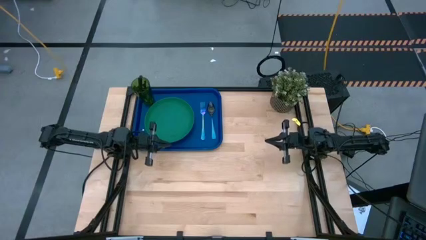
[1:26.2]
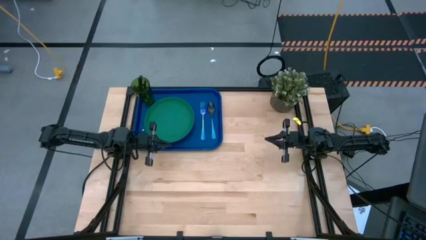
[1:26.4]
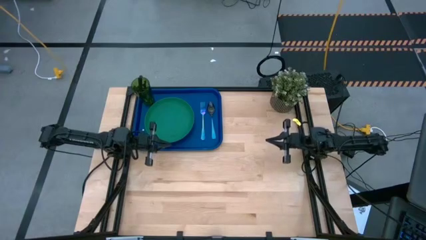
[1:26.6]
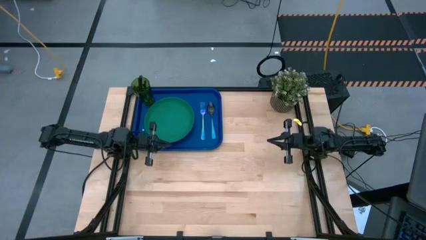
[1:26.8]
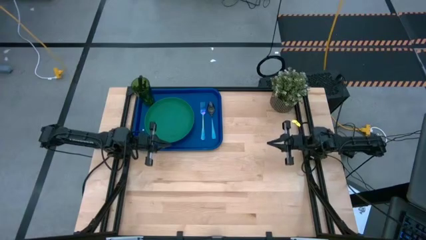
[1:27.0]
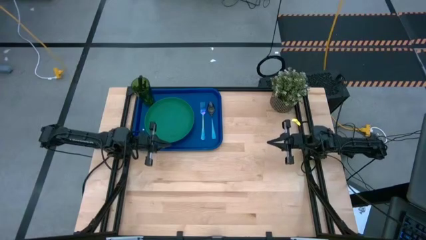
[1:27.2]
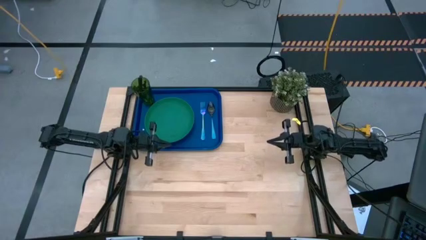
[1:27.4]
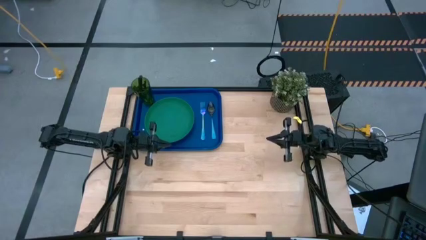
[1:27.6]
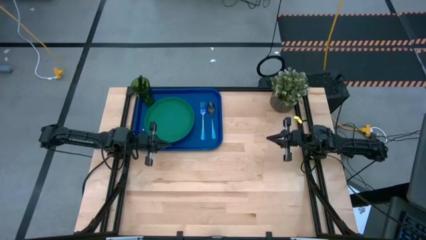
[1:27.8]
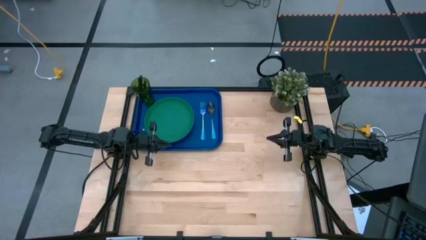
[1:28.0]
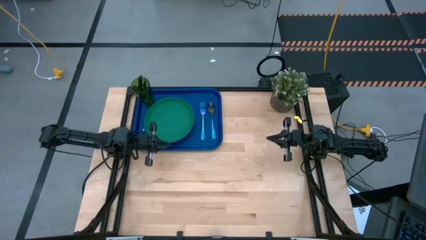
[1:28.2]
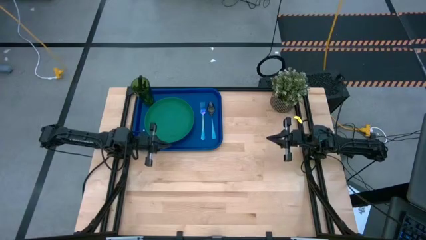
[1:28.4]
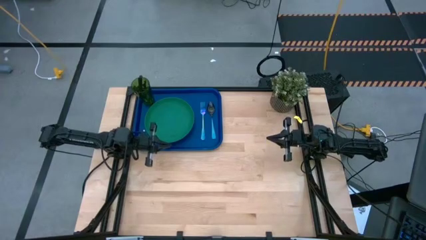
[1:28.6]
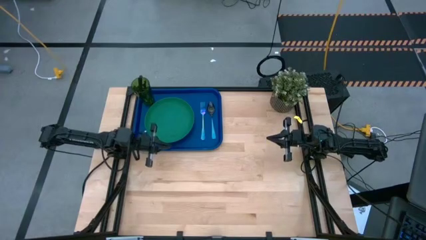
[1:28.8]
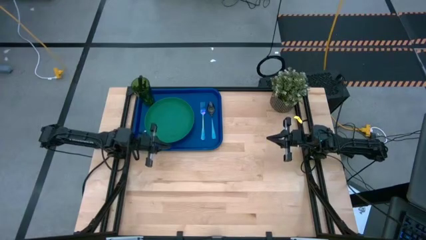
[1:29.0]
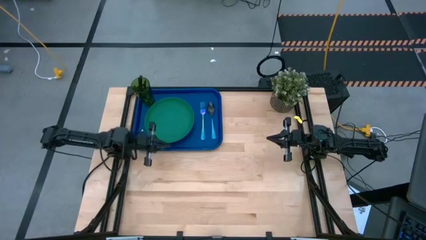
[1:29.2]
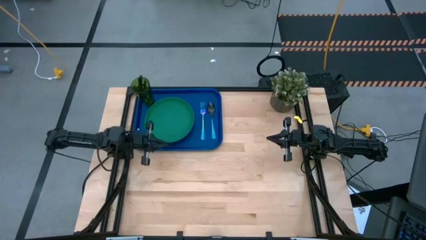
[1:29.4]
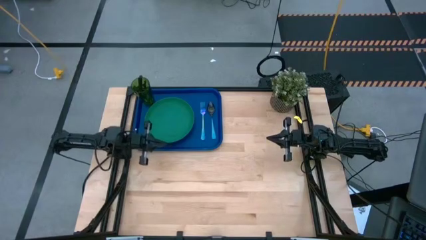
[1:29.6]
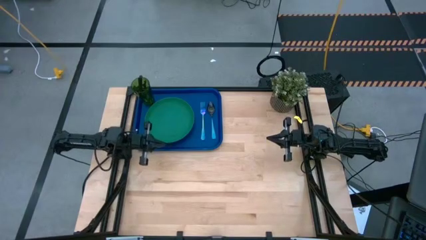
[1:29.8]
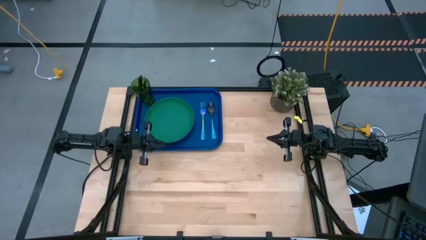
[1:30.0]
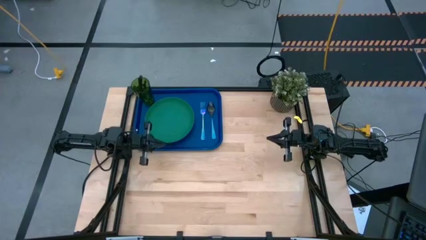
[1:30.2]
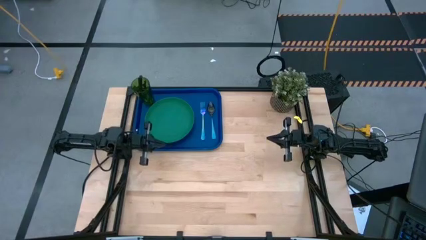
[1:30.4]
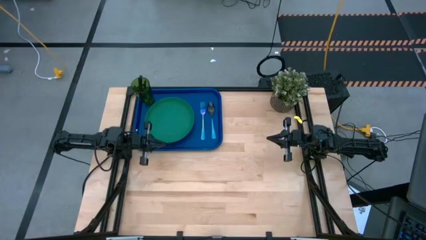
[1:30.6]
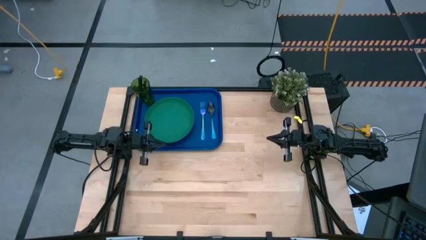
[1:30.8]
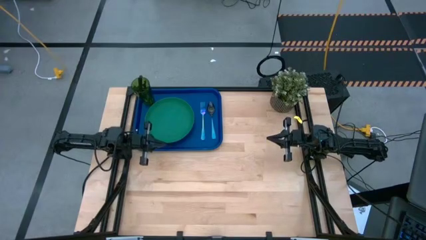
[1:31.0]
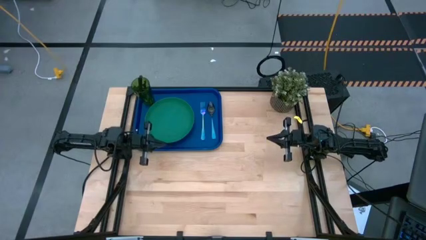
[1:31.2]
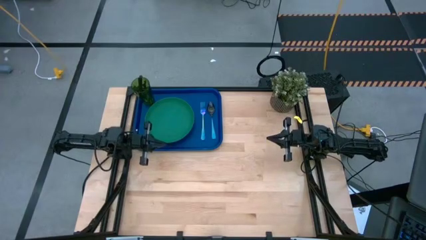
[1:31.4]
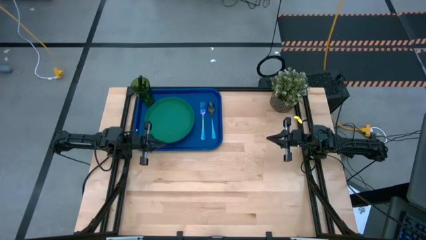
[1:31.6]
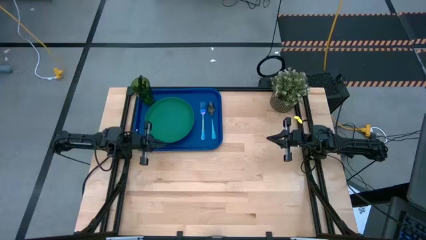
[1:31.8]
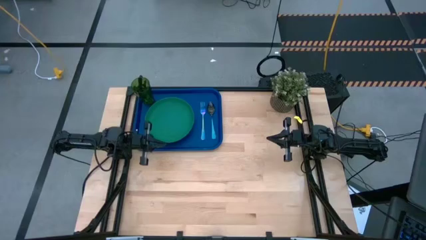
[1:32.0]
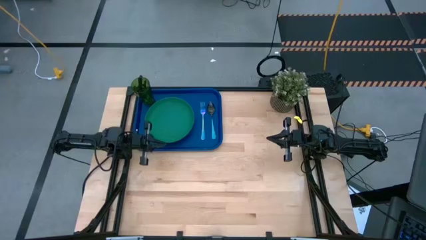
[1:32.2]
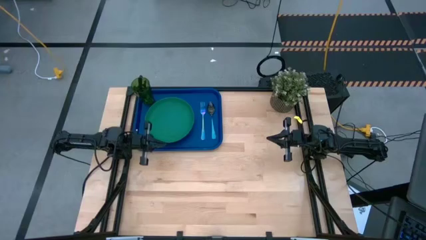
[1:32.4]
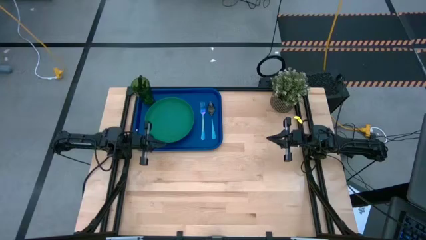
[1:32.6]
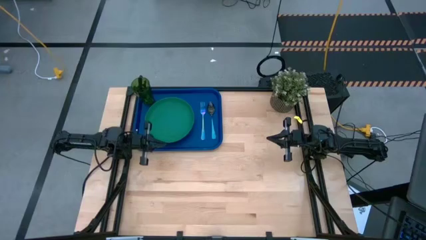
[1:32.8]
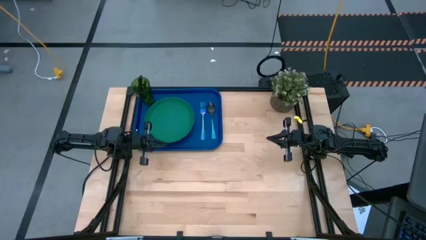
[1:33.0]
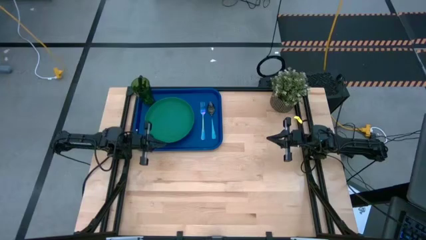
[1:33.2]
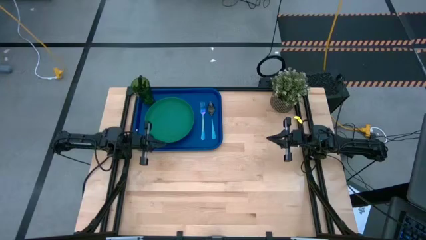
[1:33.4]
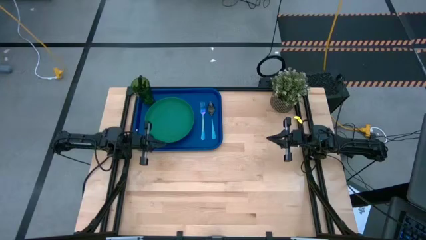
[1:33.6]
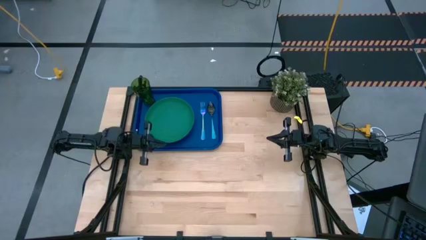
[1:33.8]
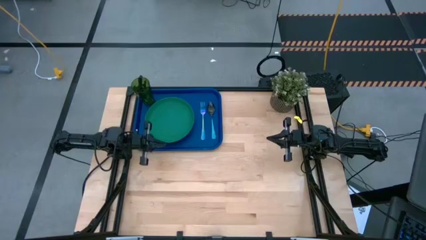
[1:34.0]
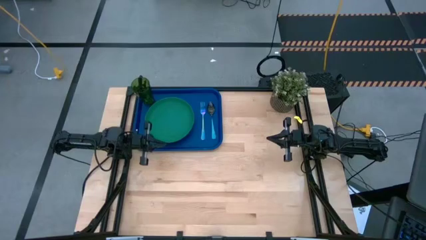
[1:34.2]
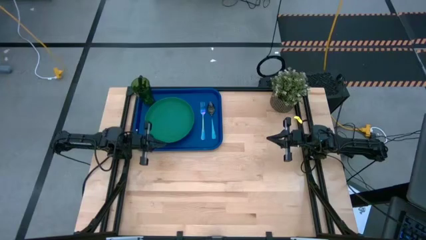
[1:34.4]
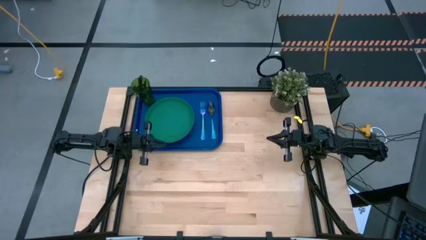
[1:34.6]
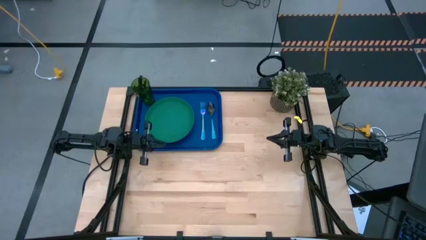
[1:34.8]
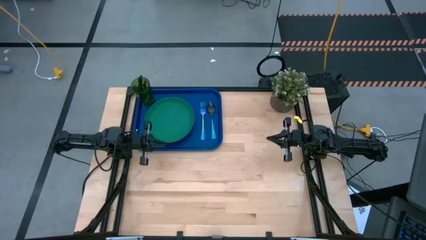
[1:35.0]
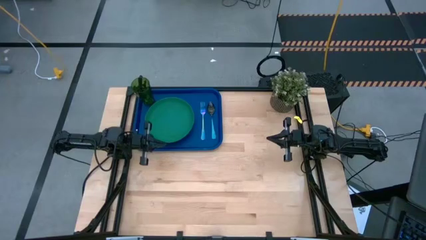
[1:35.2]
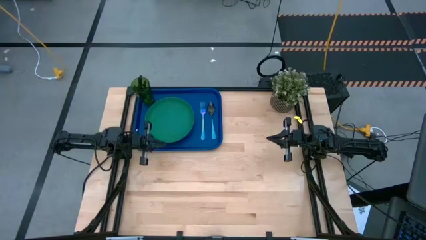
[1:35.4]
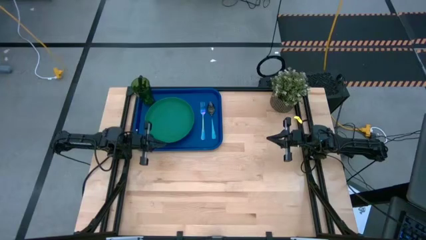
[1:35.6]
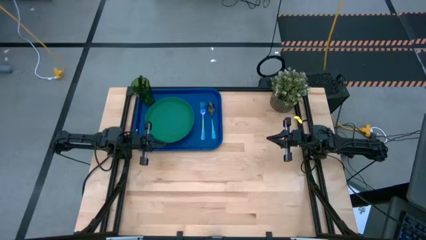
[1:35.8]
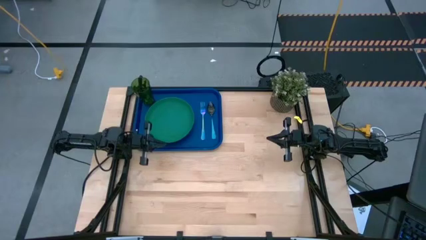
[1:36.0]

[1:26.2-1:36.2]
Task: Pick and place plate/cup/fork/spoon on tray
Return To Home Position

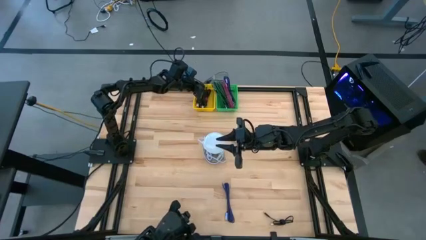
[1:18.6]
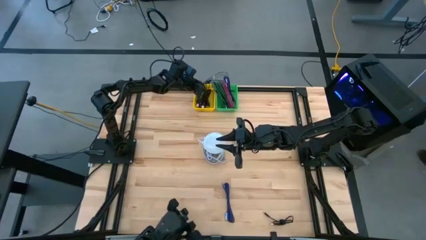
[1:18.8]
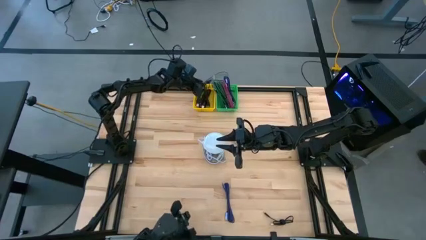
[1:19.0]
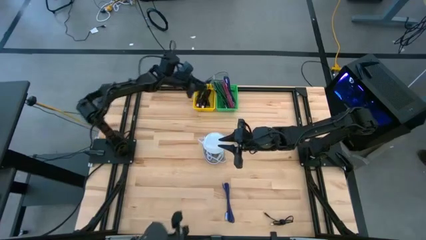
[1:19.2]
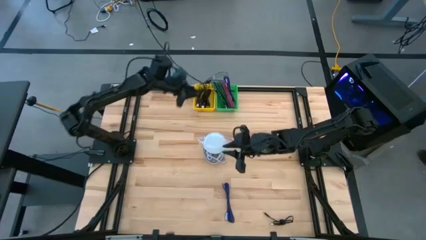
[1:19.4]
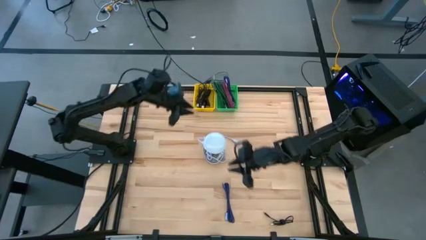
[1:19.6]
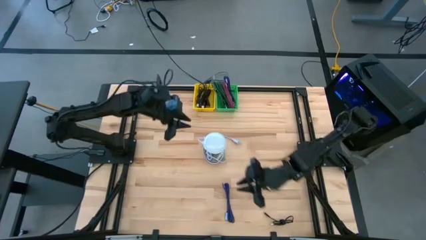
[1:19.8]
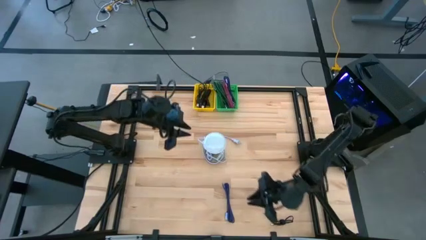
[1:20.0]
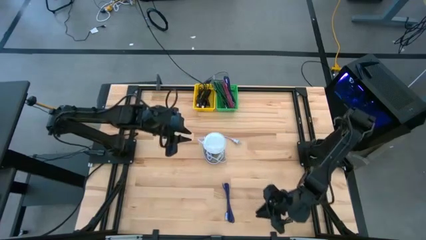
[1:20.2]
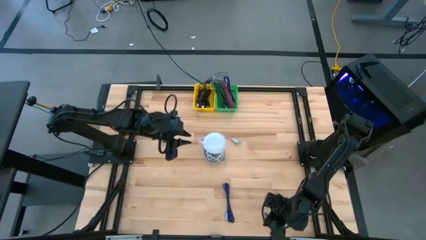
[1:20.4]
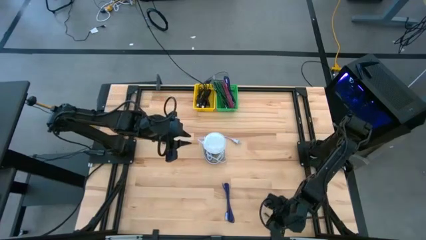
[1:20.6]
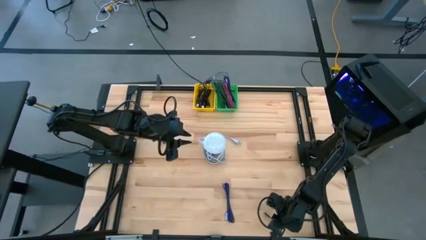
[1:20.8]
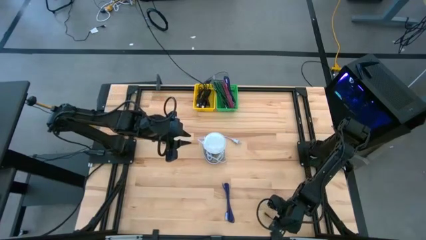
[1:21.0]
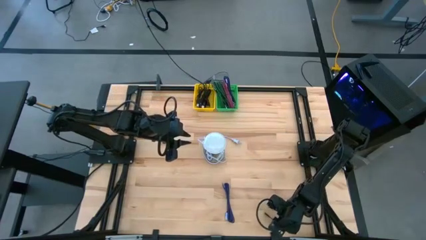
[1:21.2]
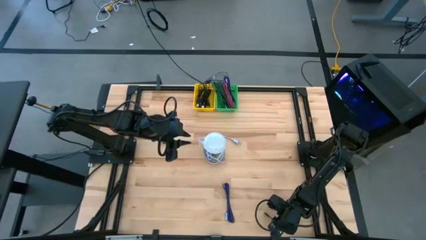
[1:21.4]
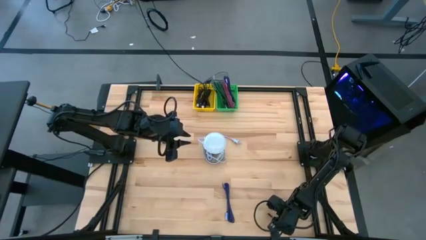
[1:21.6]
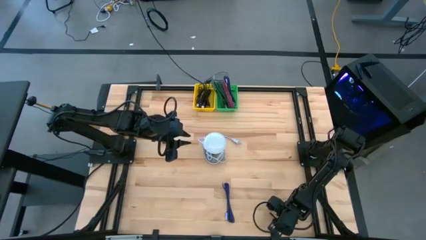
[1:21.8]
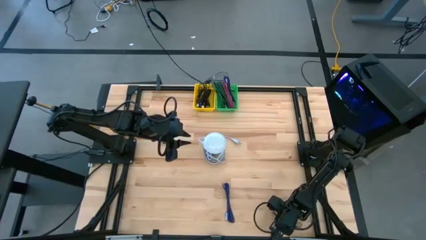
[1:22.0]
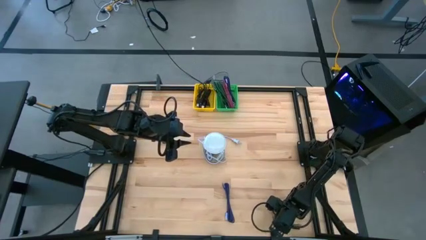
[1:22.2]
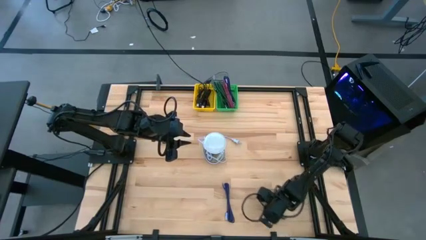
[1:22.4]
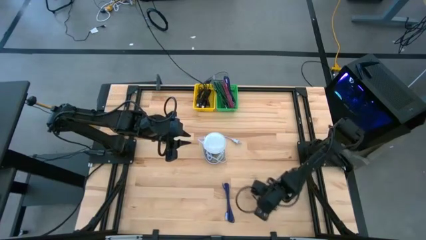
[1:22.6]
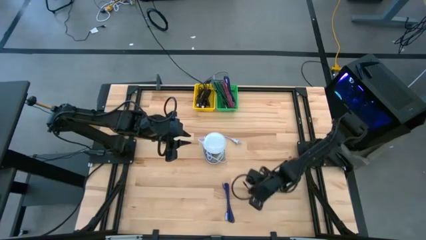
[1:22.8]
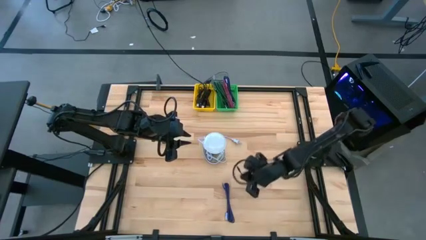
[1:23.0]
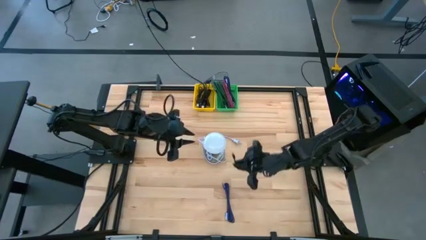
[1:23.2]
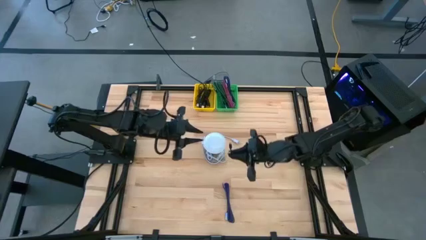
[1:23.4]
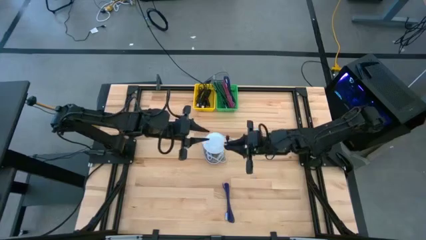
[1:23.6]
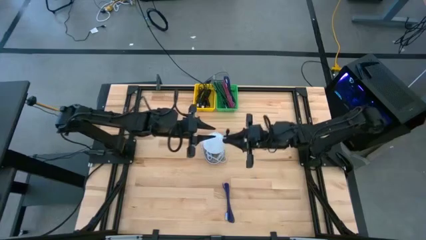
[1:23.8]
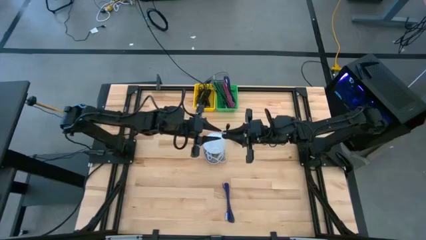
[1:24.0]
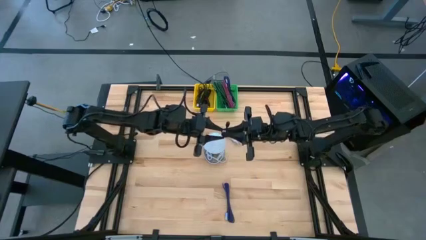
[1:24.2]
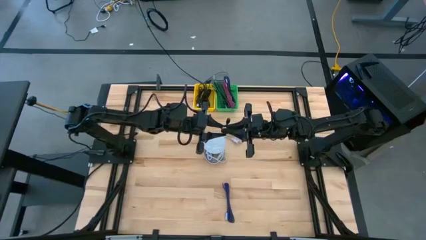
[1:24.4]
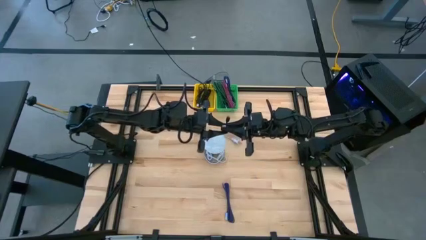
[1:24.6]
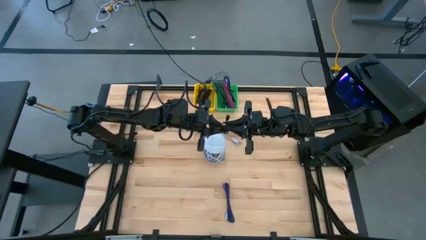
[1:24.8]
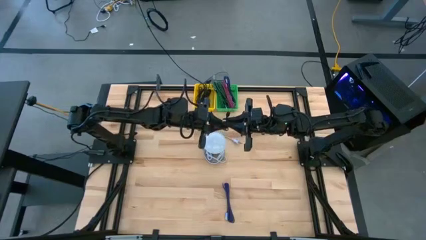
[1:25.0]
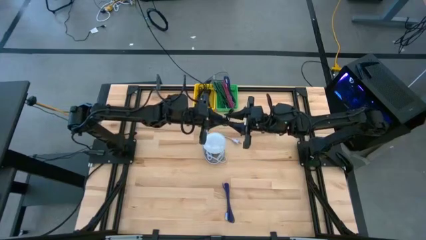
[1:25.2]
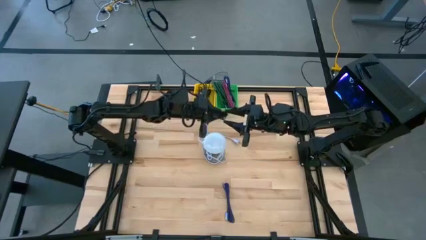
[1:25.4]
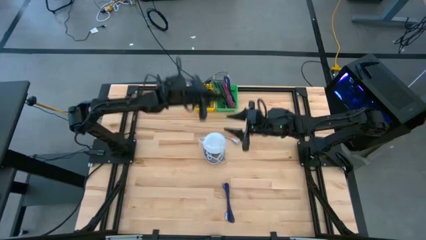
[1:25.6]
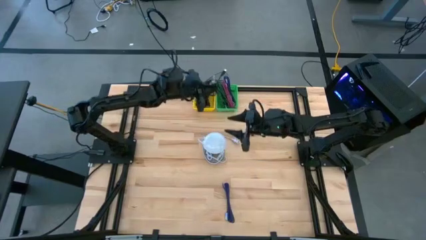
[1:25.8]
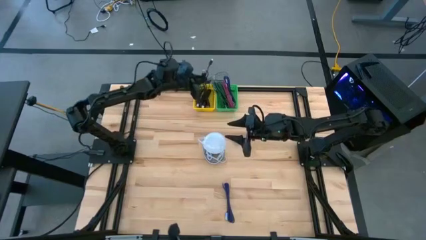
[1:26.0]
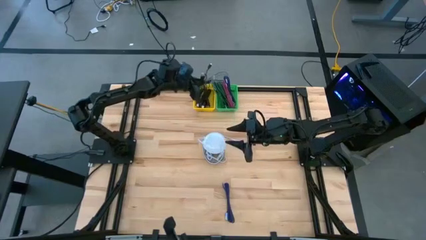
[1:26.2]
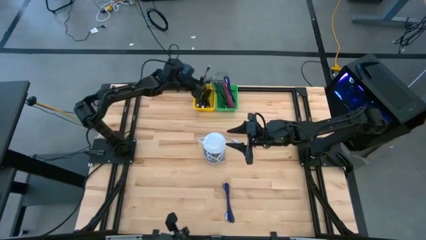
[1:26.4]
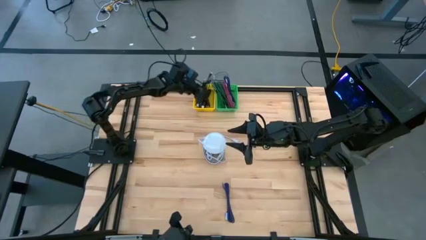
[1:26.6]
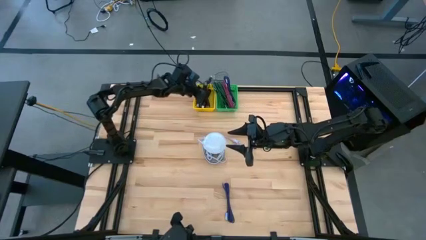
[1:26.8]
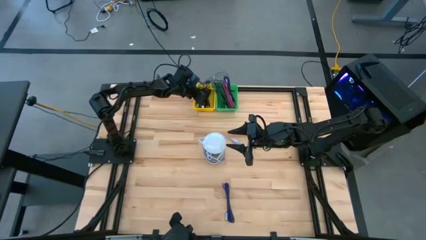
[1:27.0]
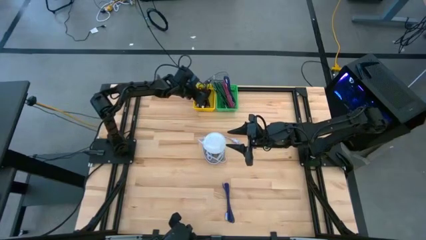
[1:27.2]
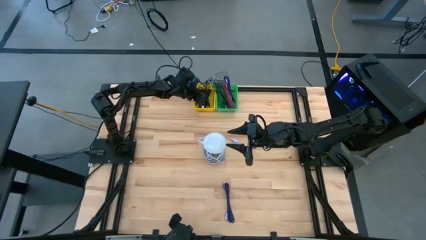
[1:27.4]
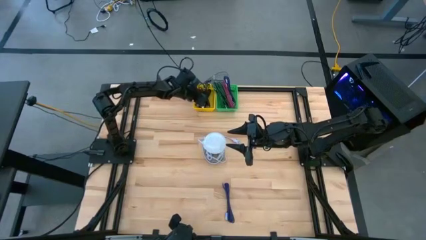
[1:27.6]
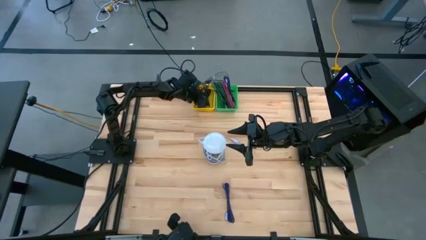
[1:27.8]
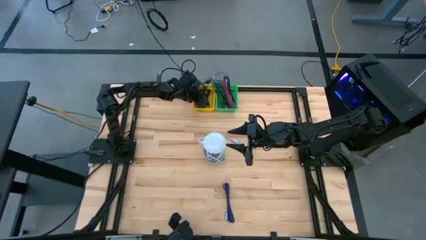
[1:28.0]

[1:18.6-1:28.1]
Task: Pick & Place USB Port
Put the black charger cable into the yellow bin
